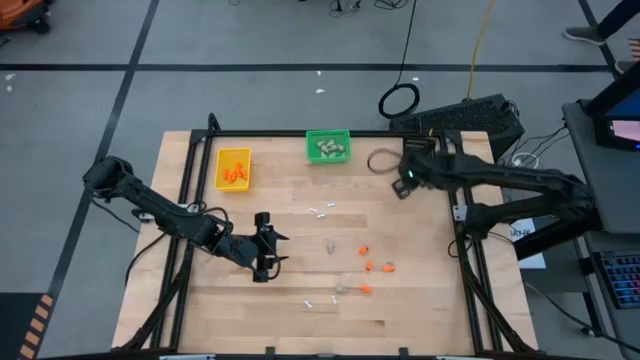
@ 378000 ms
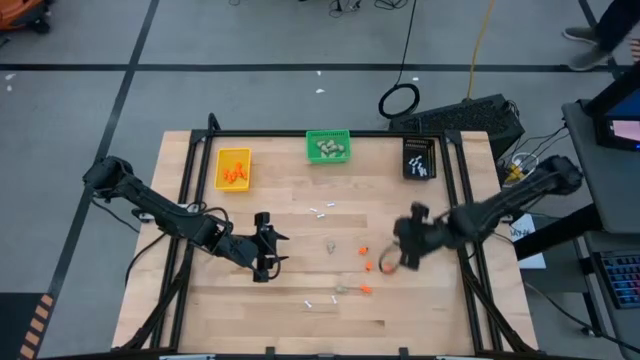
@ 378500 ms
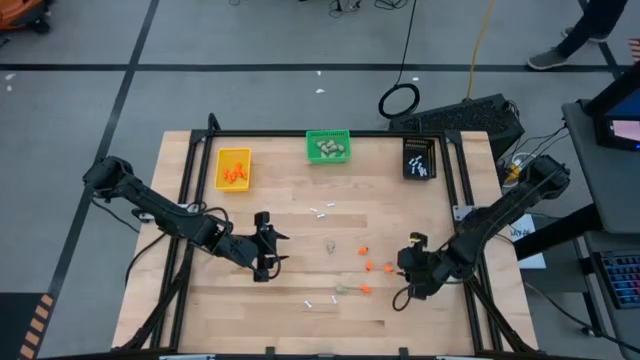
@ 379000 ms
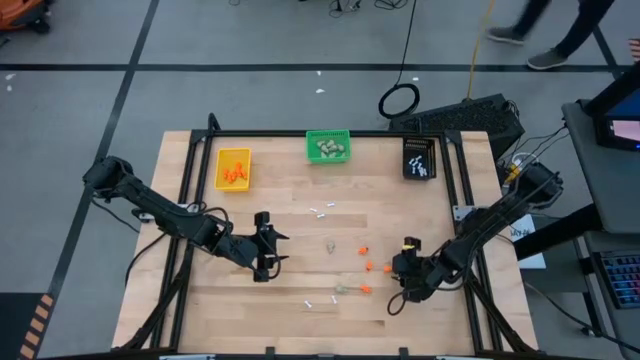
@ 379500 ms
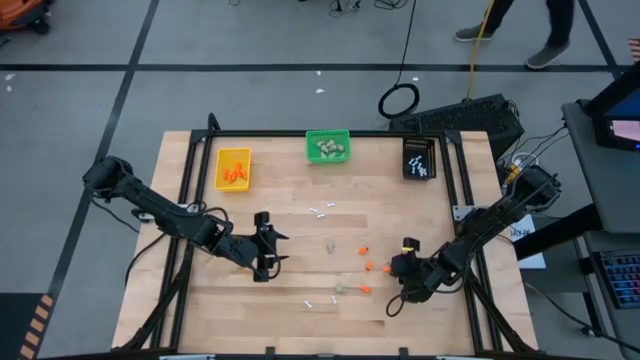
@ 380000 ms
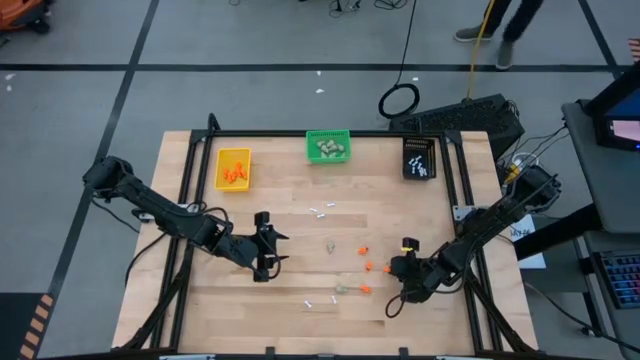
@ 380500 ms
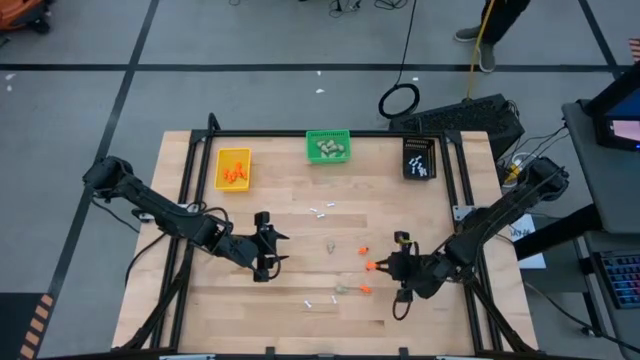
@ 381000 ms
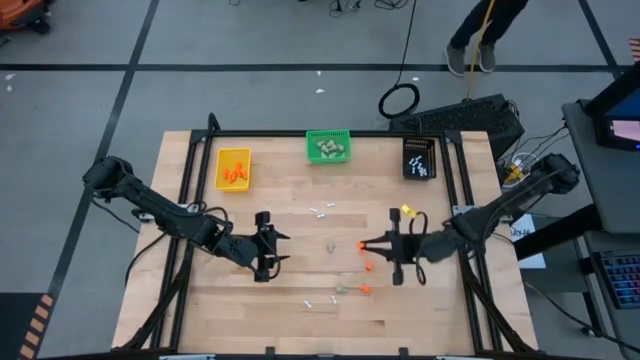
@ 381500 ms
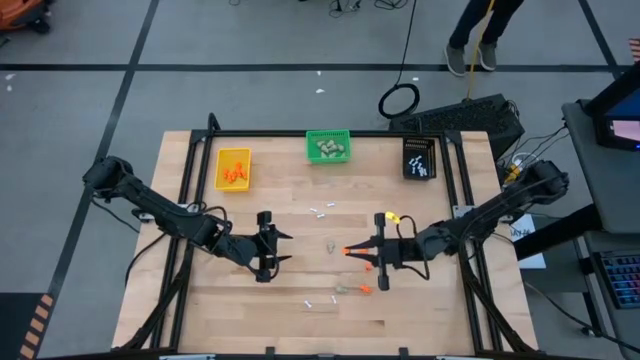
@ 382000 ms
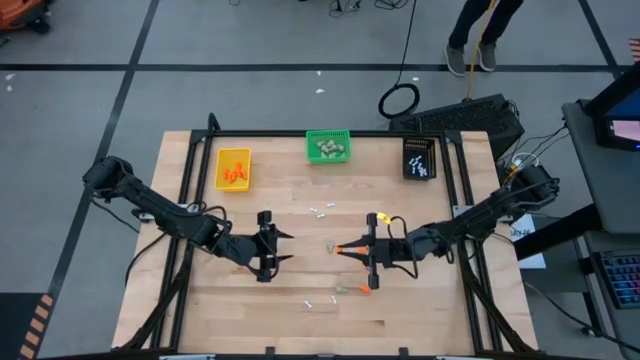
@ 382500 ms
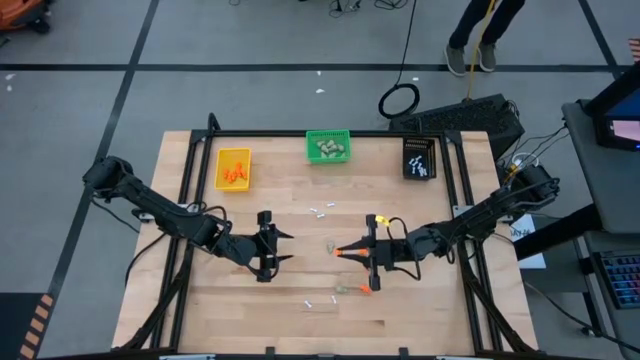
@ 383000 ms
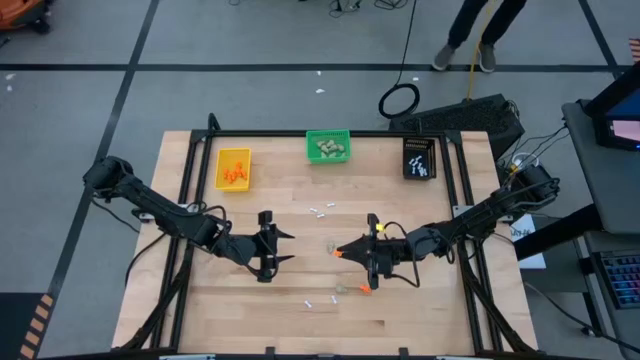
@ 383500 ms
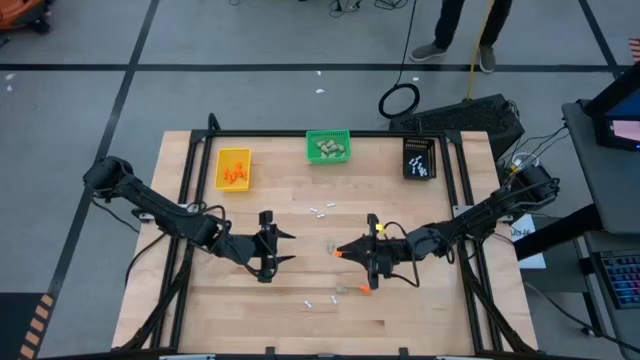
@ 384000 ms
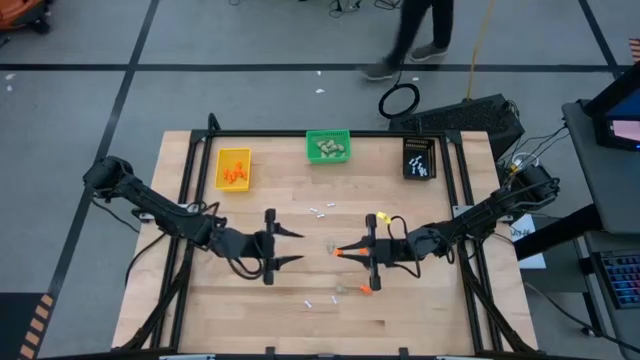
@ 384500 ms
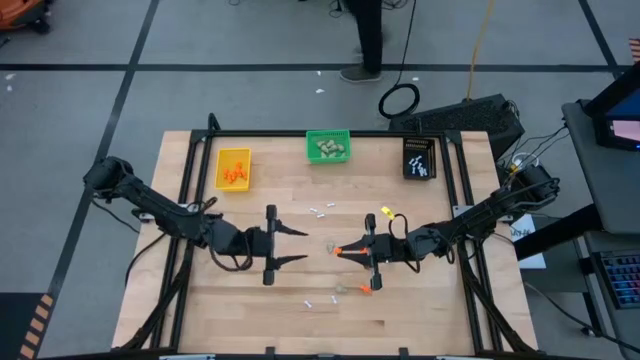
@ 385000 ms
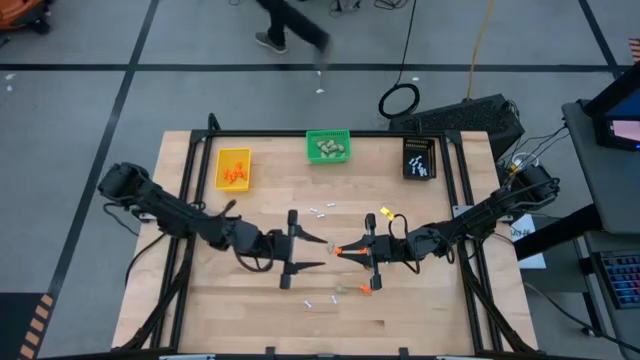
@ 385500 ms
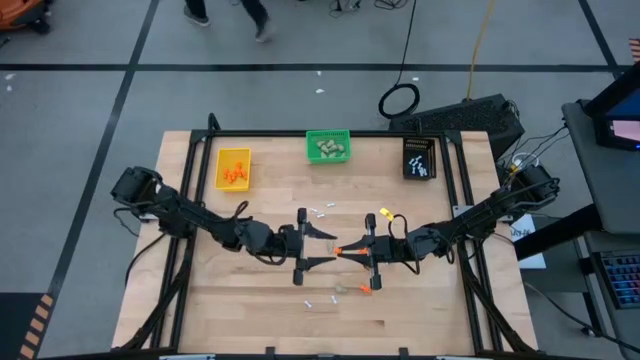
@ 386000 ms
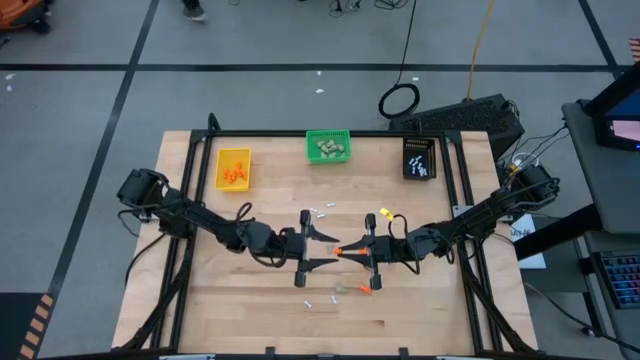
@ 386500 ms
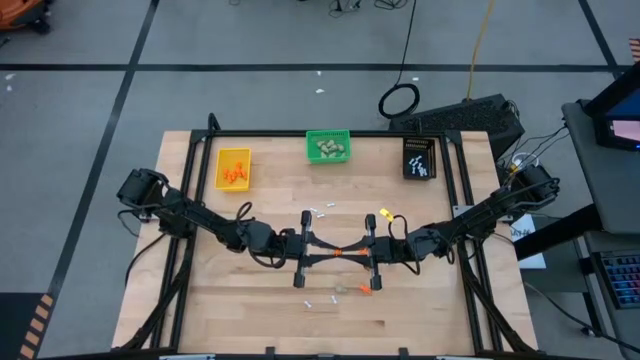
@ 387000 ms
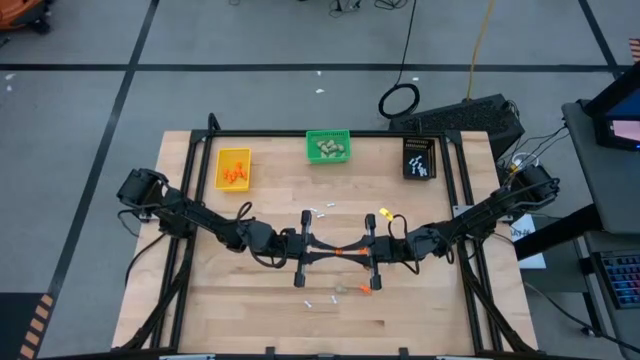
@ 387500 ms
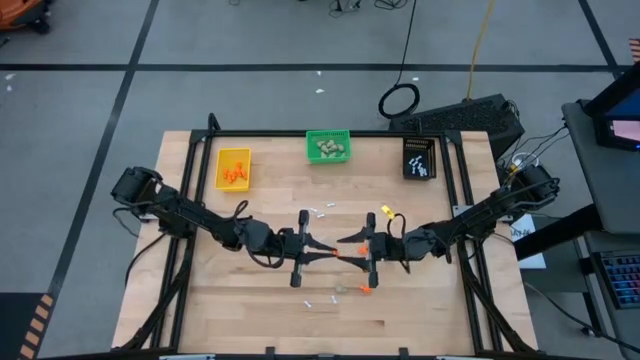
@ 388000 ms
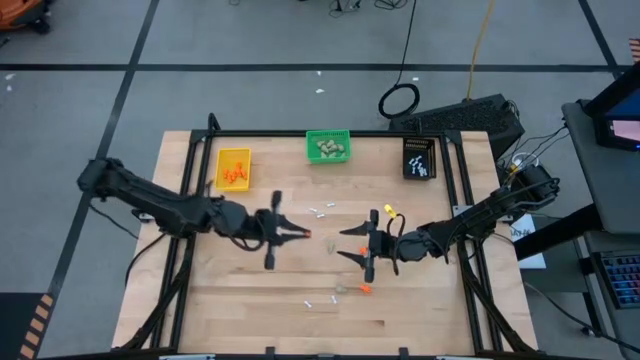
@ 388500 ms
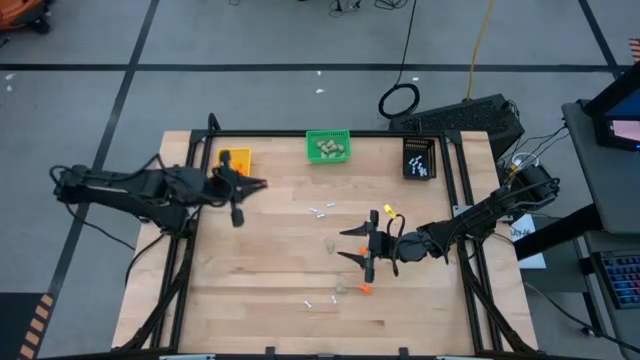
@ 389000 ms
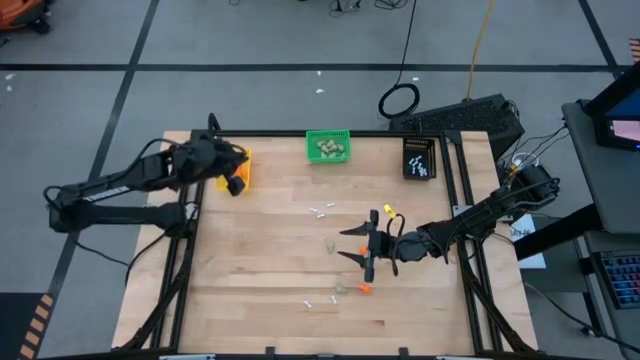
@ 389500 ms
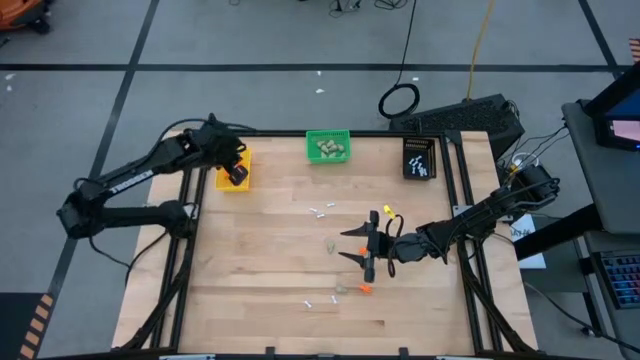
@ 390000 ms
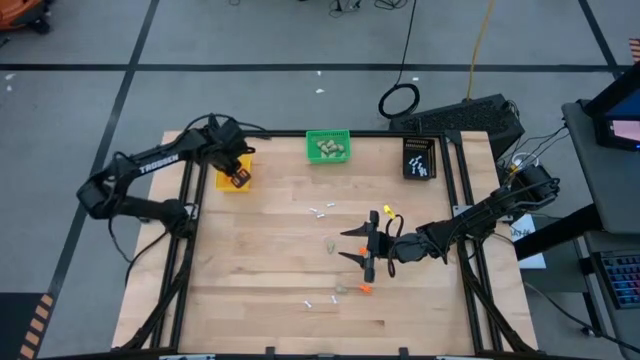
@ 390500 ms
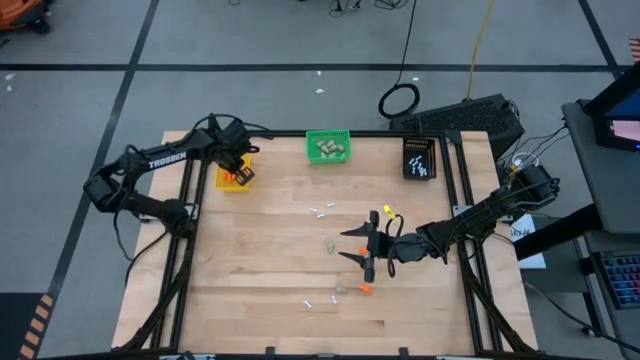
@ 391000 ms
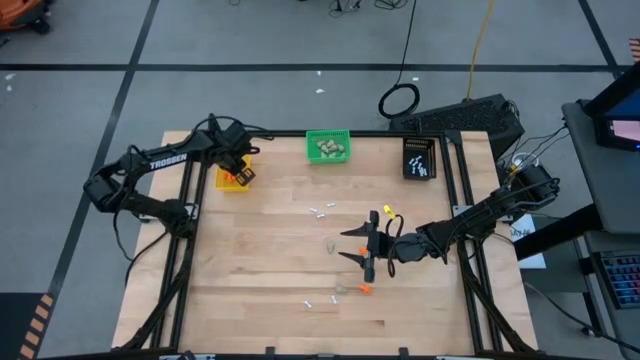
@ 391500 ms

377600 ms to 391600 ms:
Task: Sort Halloween decoration
Put the orange skeleton toy into the yellow bin

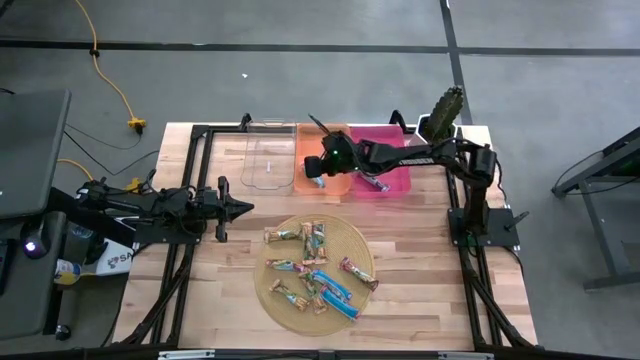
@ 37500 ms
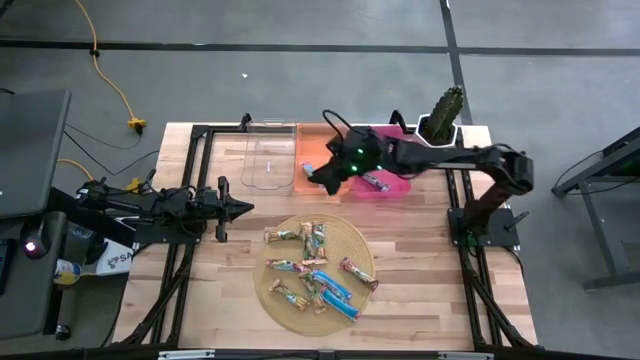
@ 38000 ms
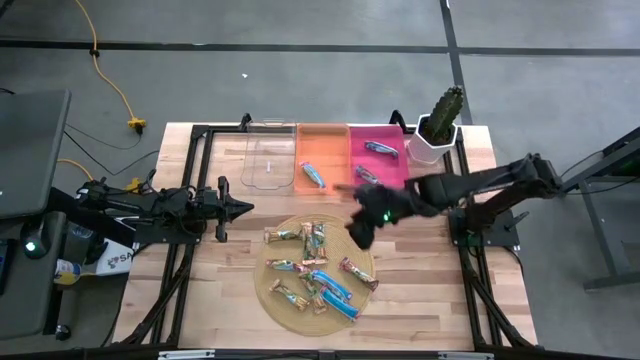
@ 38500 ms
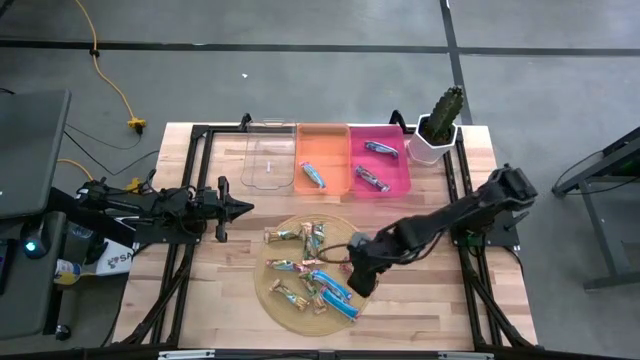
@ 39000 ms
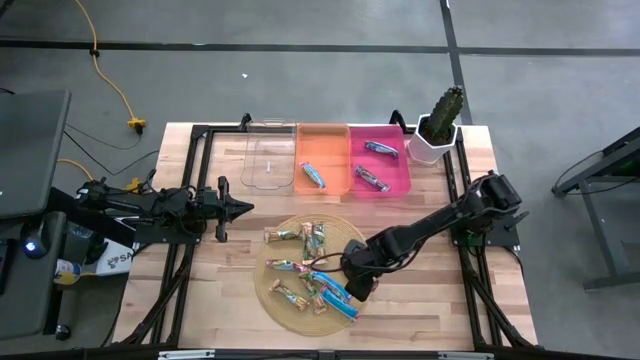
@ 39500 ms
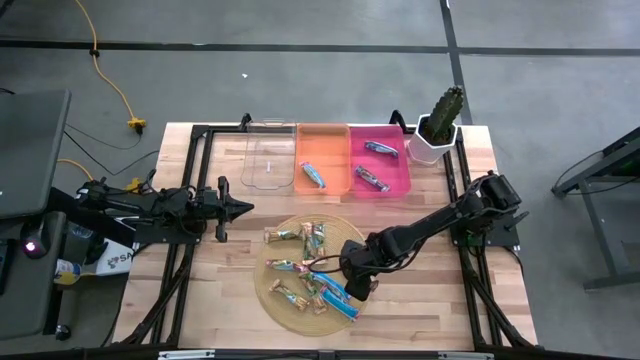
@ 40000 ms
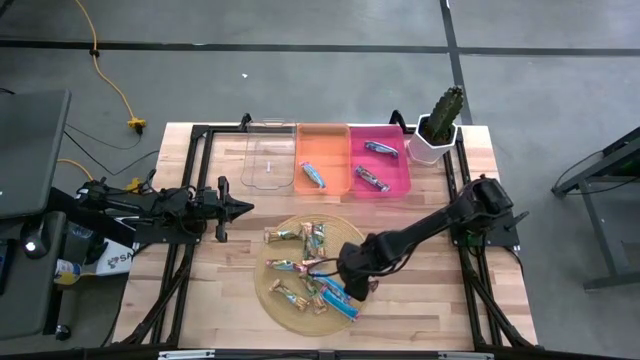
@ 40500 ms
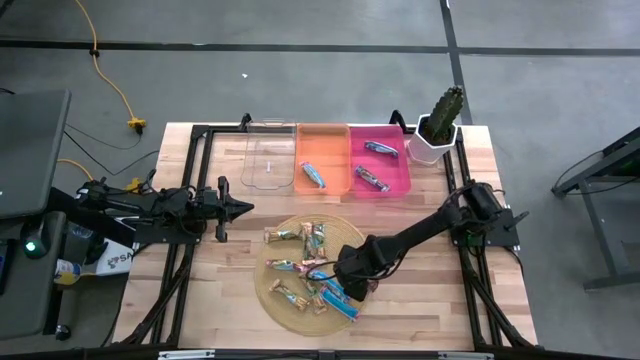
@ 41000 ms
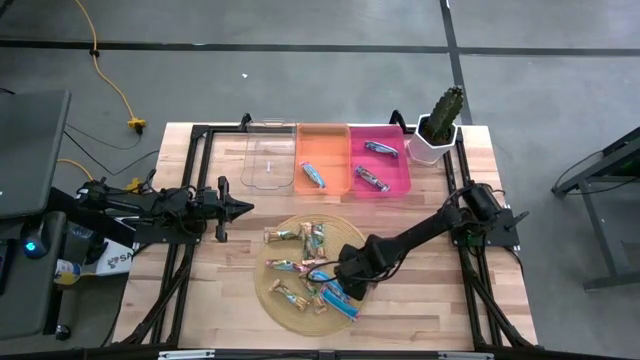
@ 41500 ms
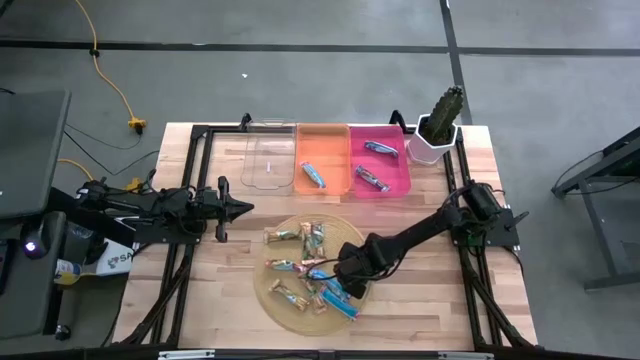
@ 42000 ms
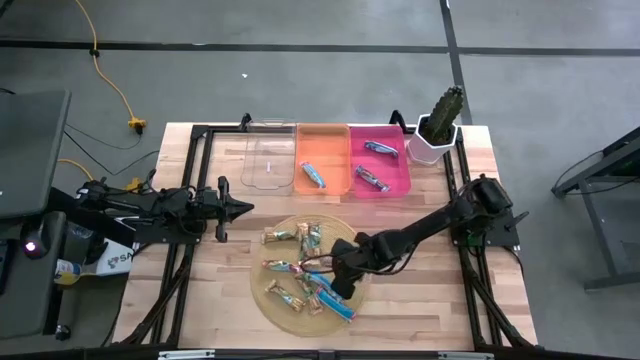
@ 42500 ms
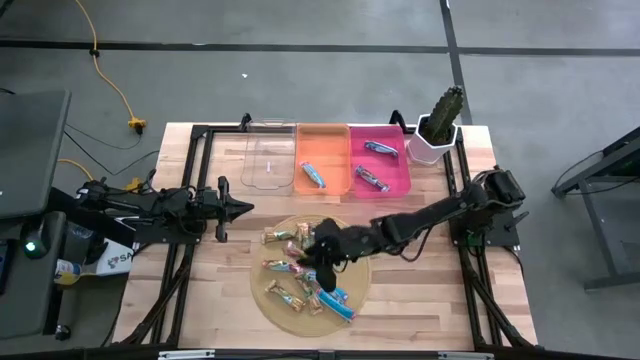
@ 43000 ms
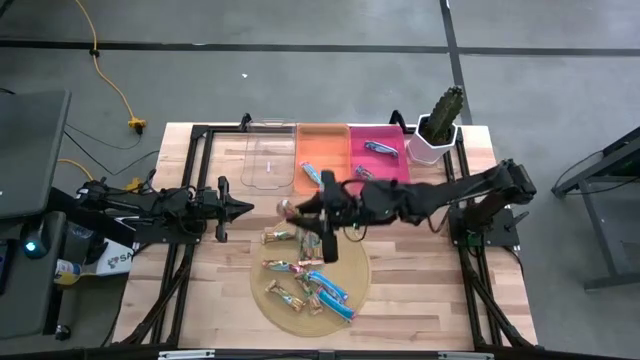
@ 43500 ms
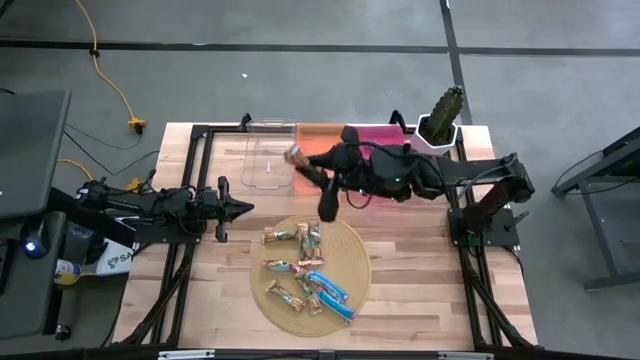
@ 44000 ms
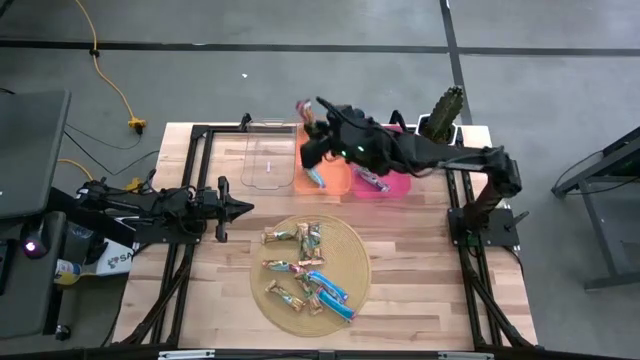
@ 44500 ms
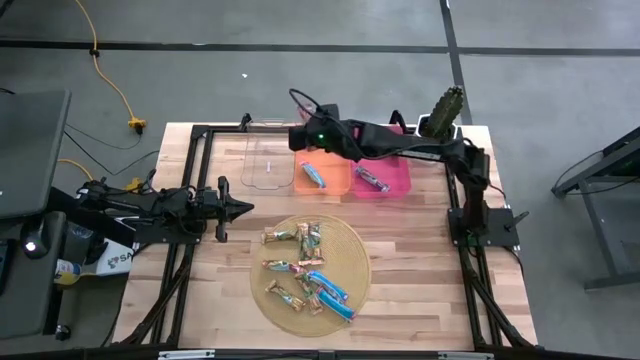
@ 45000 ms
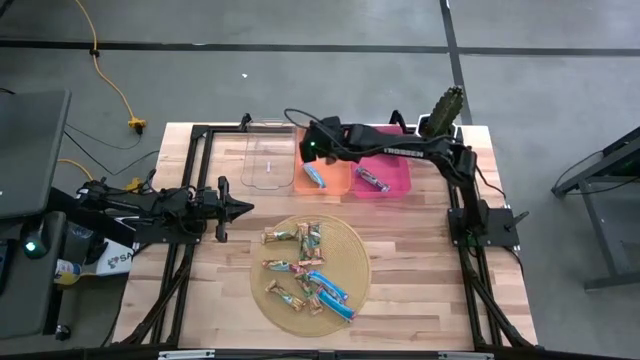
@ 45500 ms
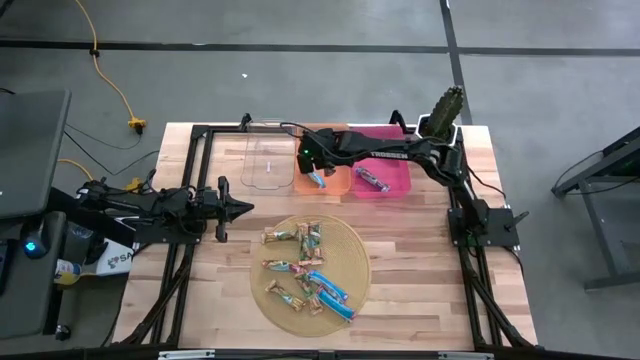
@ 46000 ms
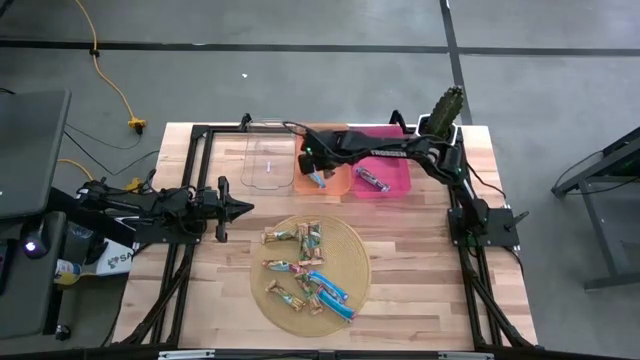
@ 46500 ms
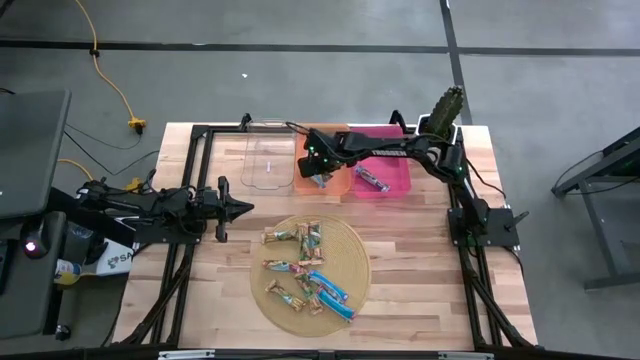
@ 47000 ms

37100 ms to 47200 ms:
Task: Pick and place Granola Bars by type
Put the red granola bar into the orange bin
